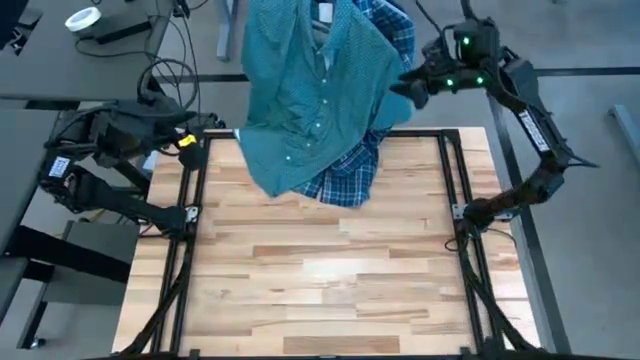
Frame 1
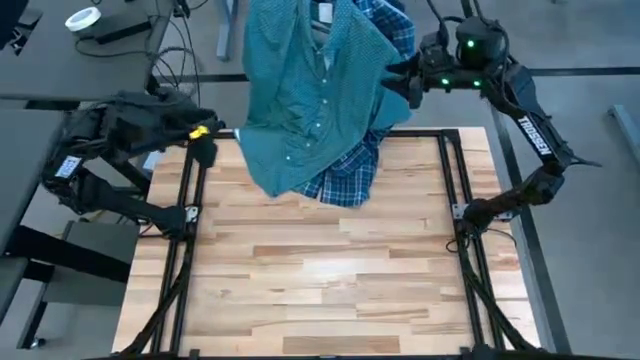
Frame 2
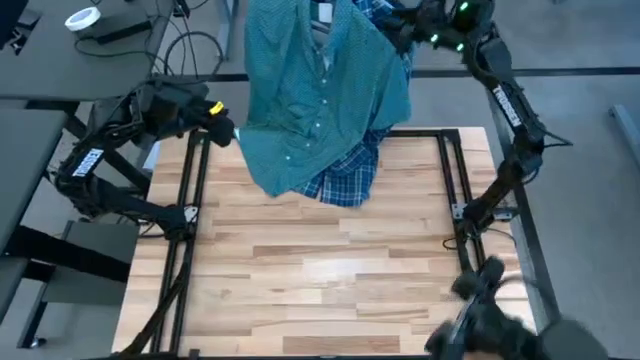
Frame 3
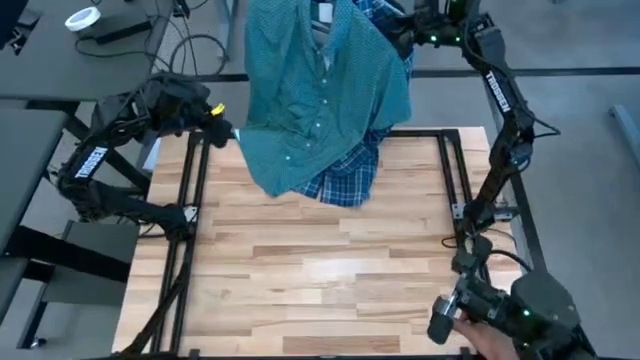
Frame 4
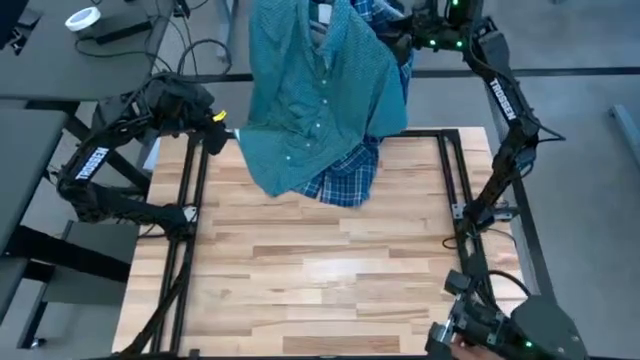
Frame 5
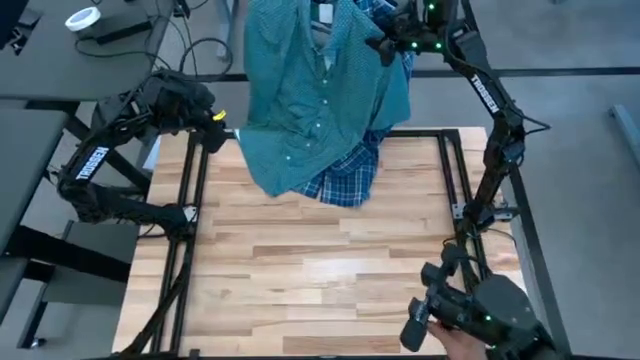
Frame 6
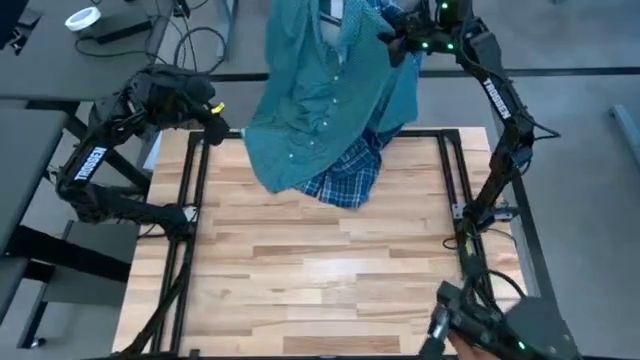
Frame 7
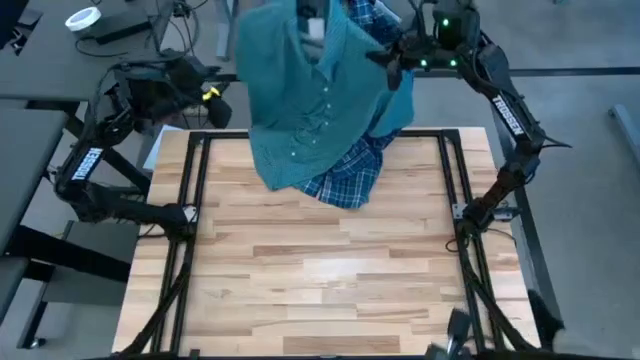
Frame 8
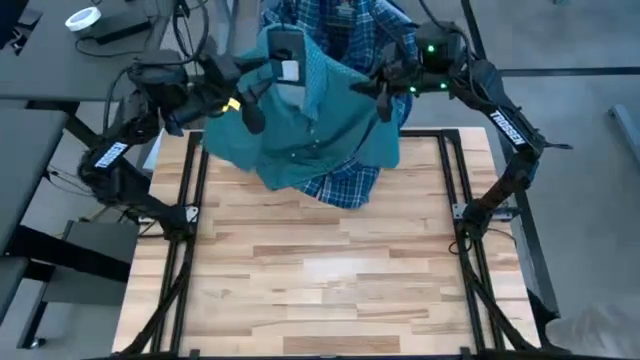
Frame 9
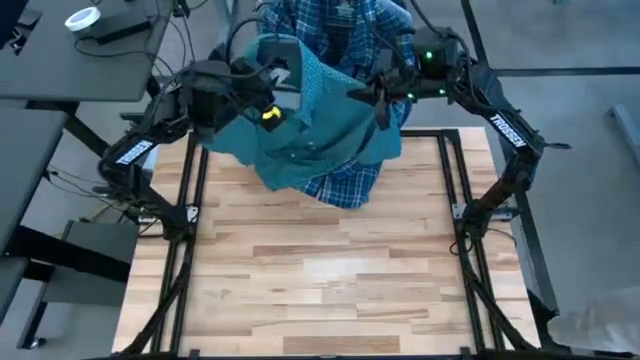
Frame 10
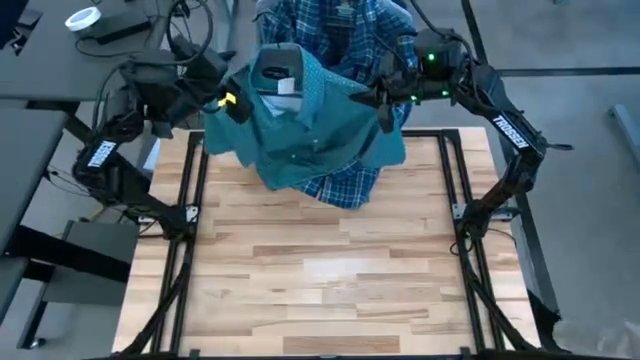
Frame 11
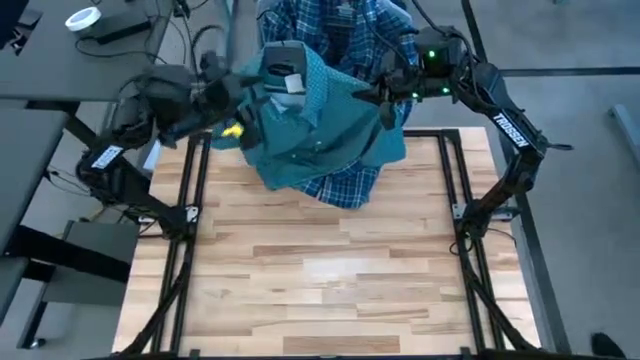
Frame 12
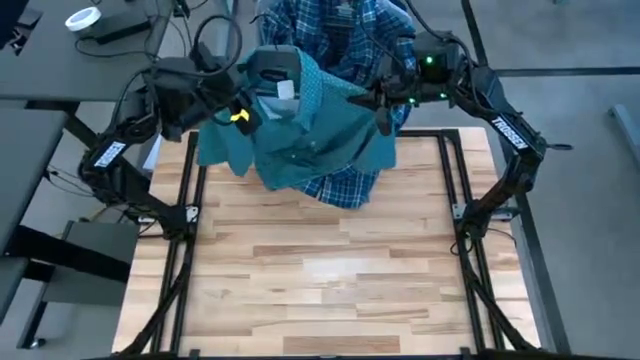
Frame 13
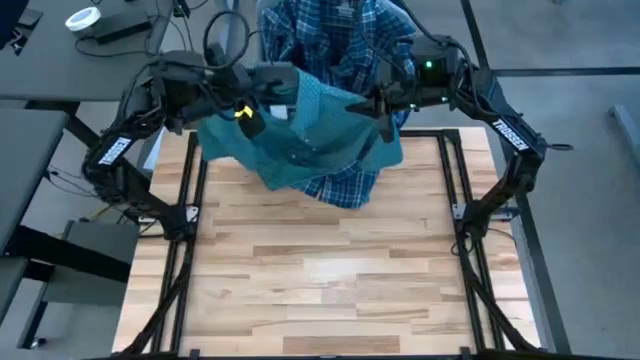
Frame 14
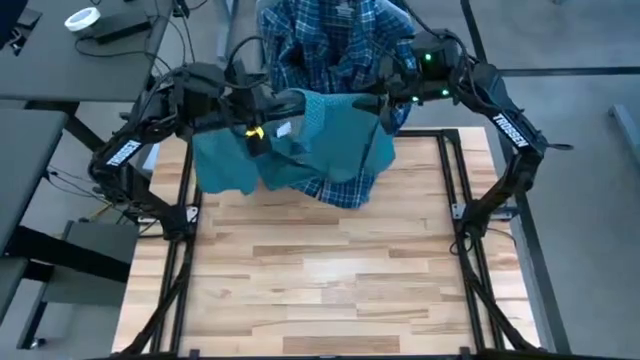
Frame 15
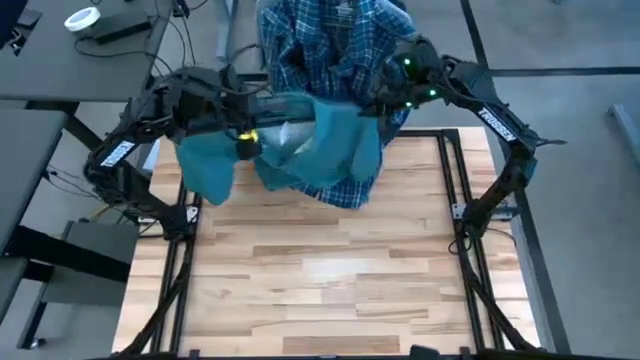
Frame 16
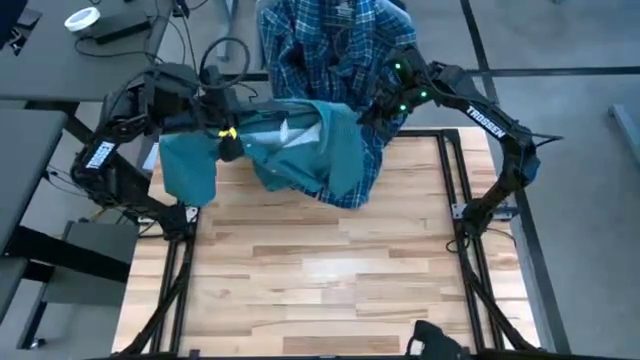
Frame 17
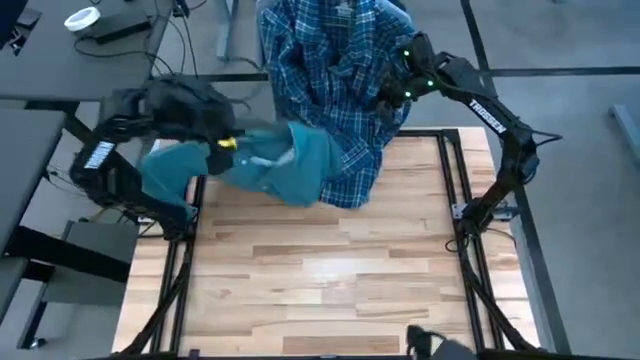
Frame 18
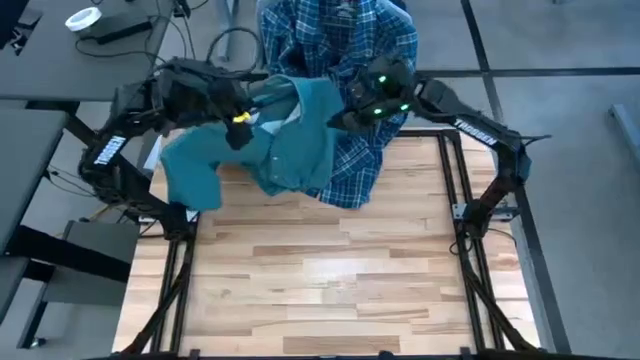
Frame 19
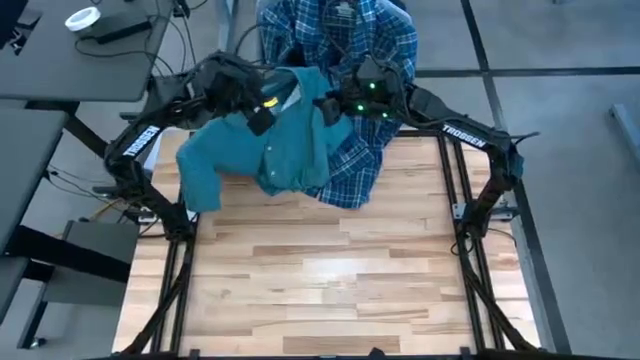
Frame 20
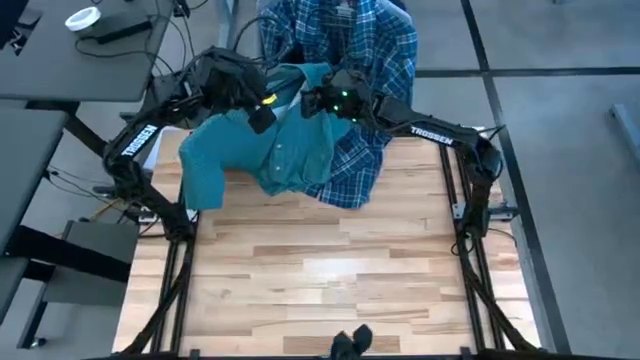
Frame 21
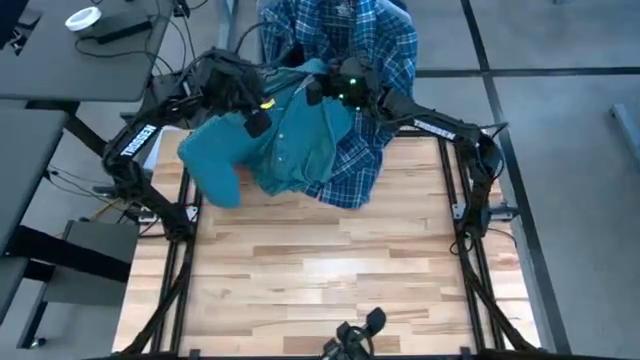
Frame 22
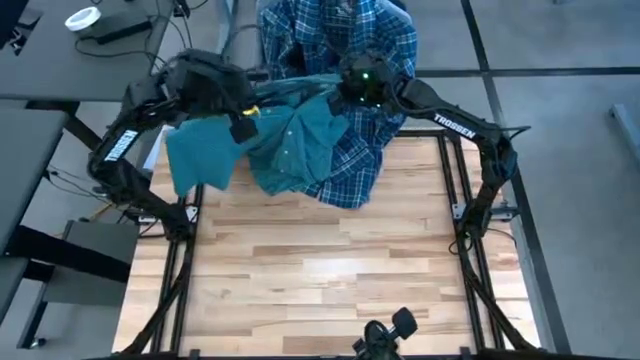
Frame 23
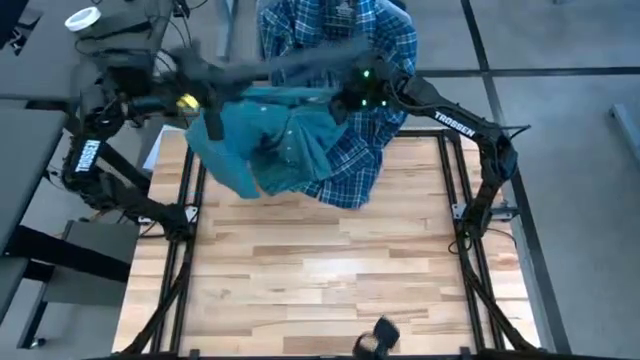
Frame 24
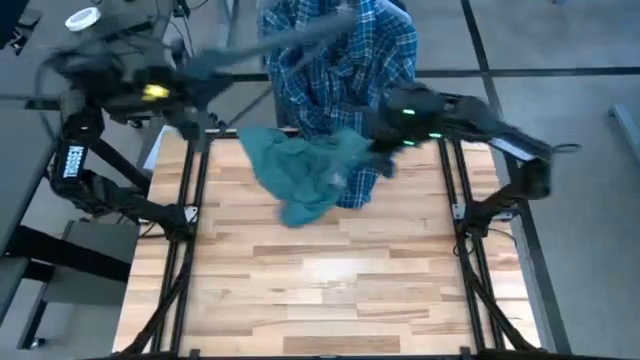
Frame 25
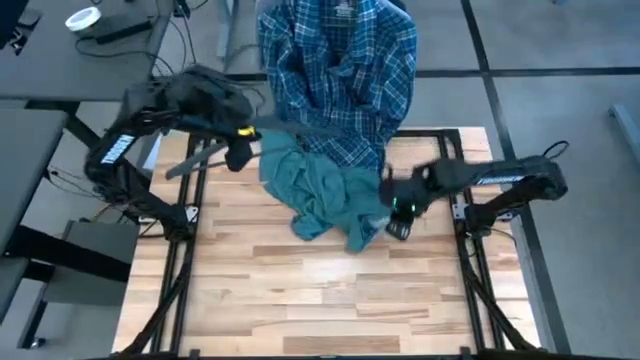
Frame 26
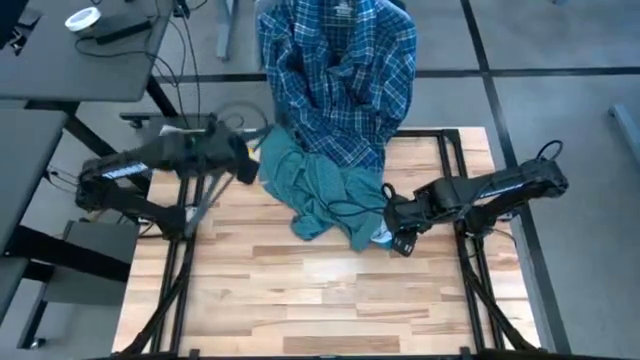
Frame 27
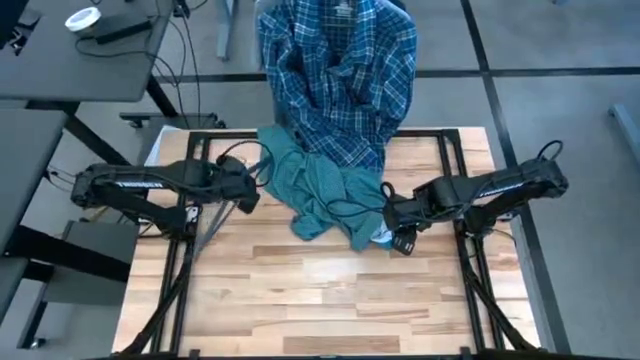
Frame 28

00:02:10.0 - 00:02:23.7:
Task: Hang clothes
Unhang the green polo shirt from the hanger rack

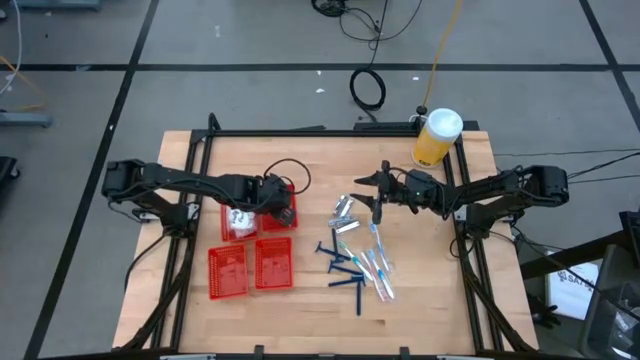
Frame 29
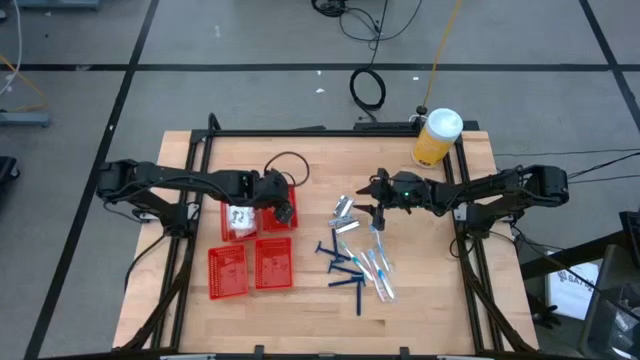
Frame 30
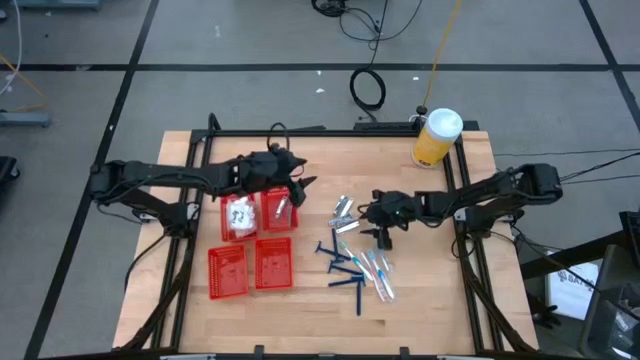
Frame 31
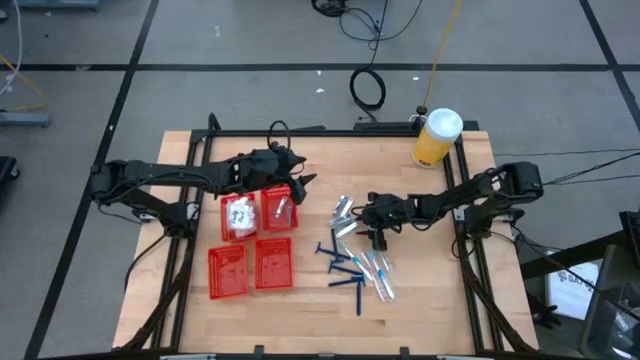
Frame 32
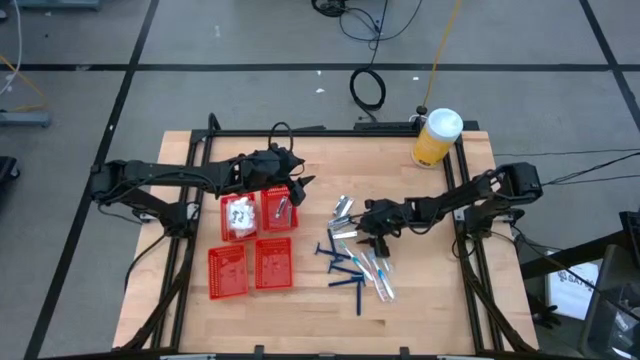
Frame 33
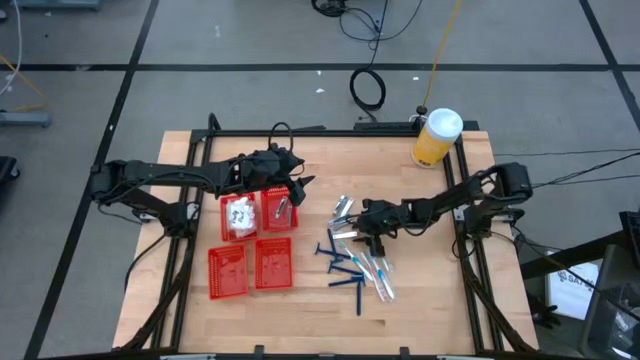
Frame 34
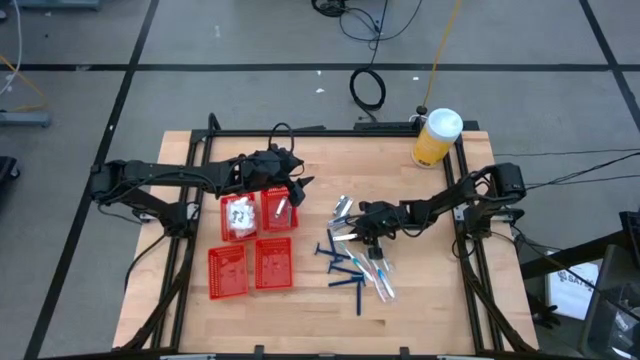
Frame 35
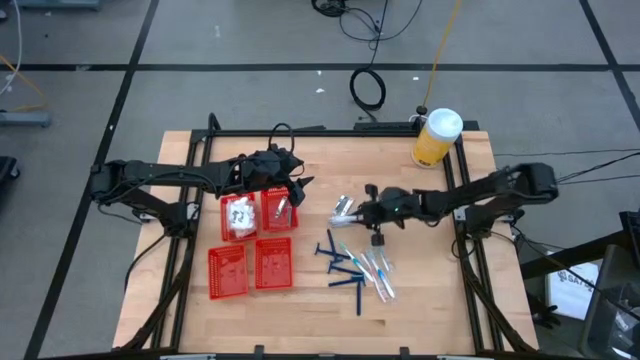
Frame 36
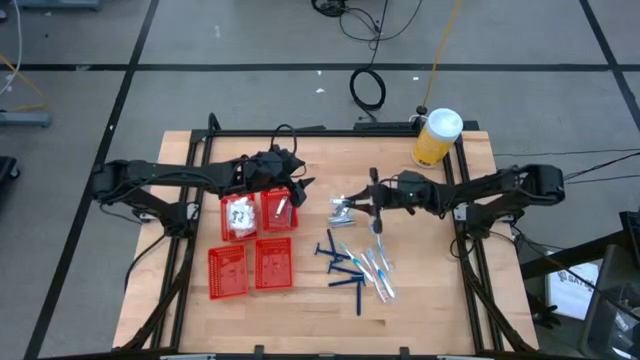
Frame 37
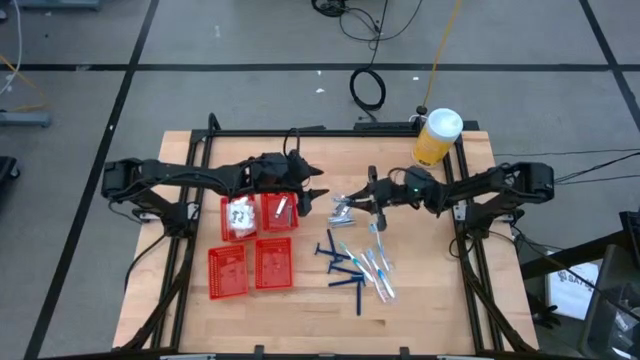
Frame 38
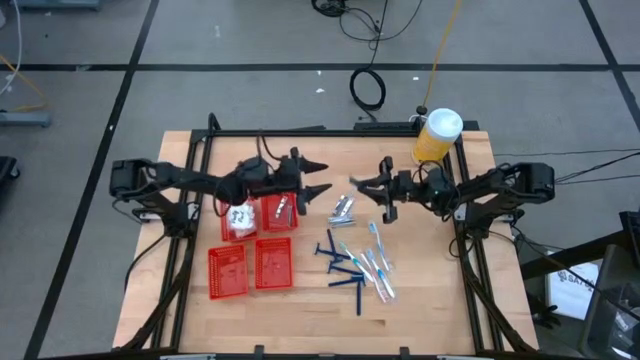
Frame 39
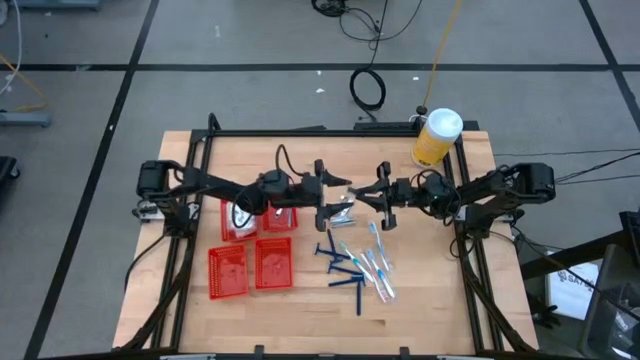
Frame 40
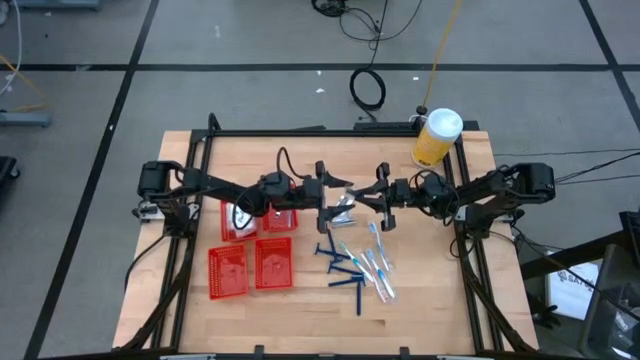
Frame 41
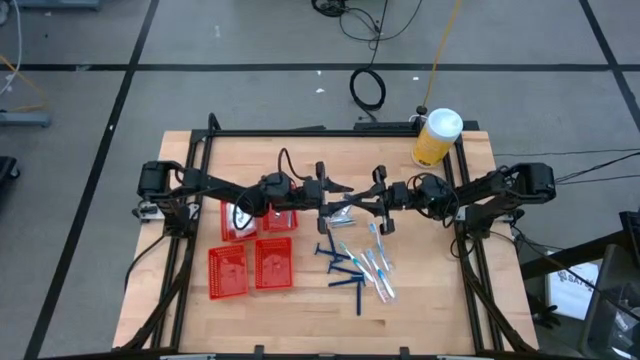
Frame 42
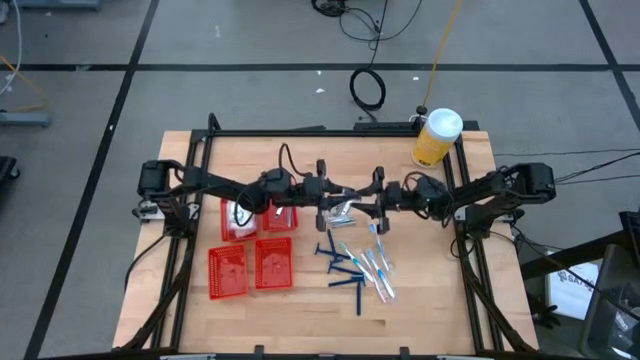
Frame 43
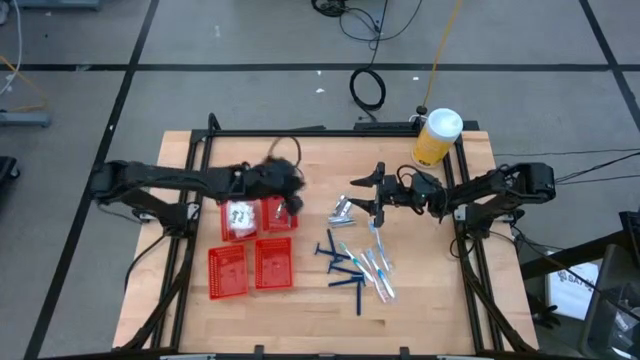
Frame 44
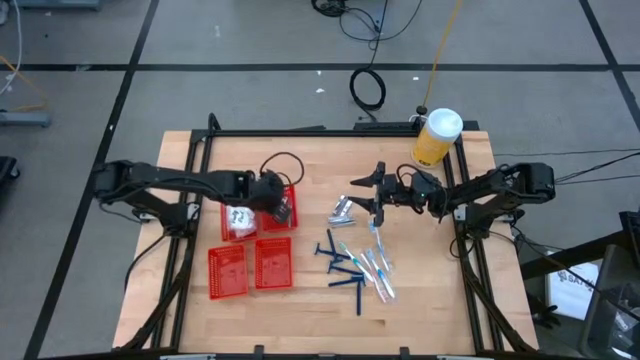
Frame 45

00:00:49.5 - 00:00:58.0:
Task: Pick & Place Travel size toiletries
Put the silver nail cutter into the top right red basket
